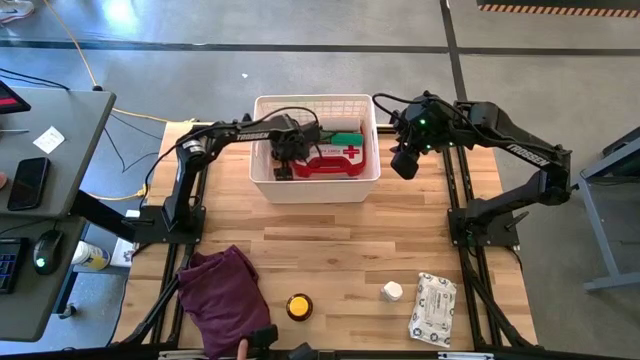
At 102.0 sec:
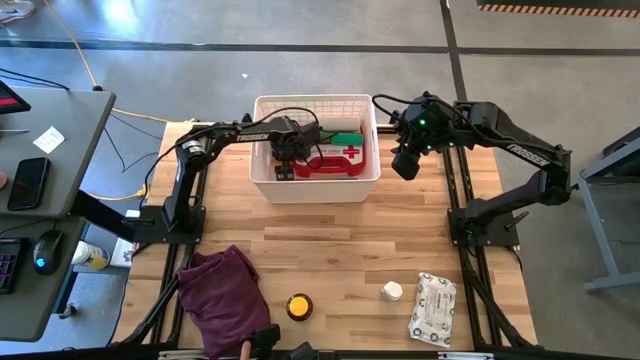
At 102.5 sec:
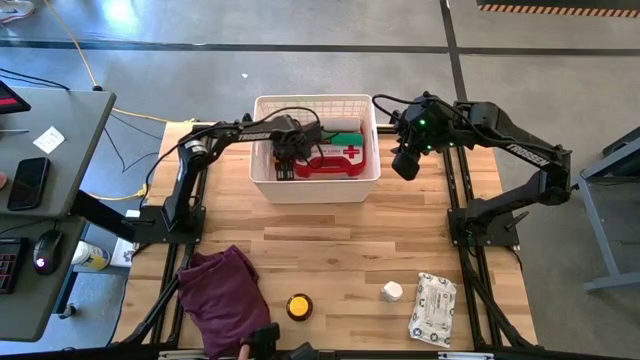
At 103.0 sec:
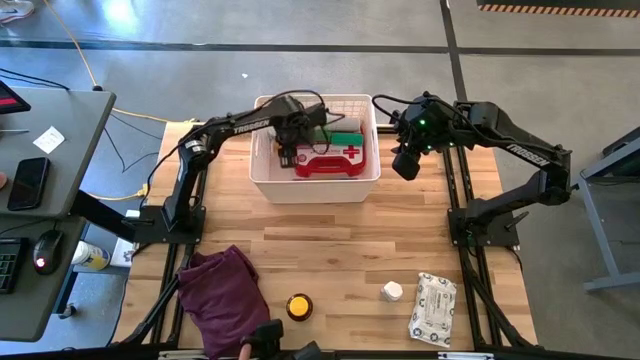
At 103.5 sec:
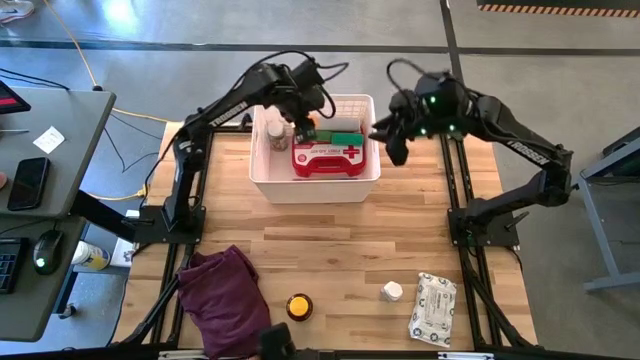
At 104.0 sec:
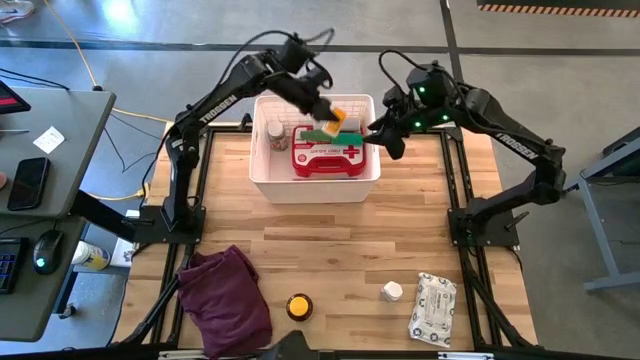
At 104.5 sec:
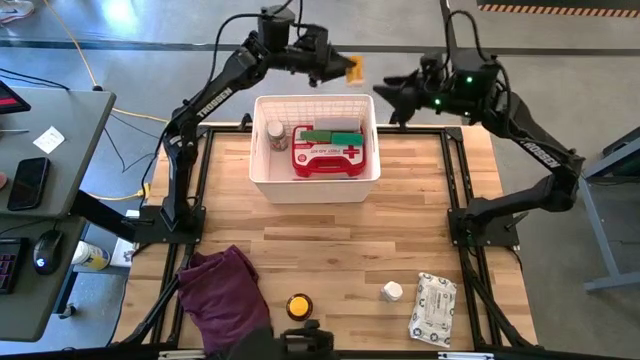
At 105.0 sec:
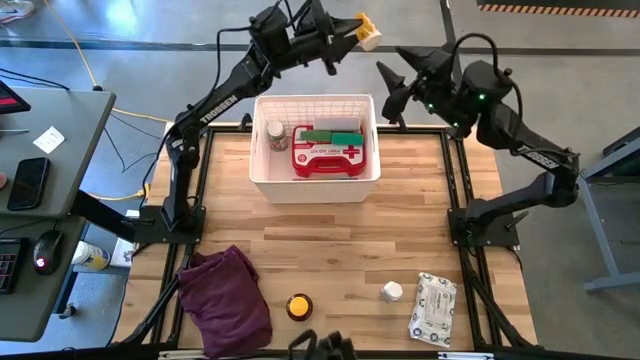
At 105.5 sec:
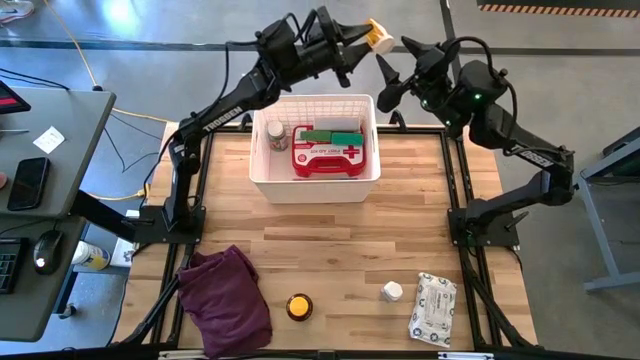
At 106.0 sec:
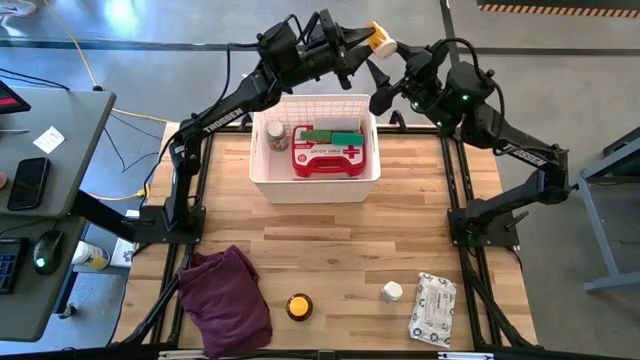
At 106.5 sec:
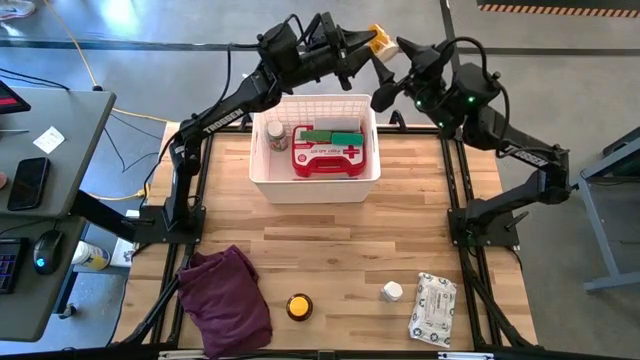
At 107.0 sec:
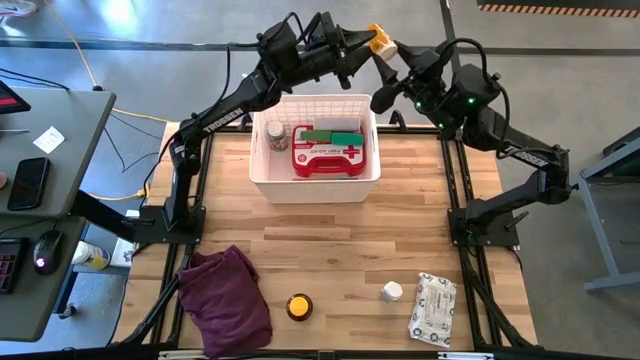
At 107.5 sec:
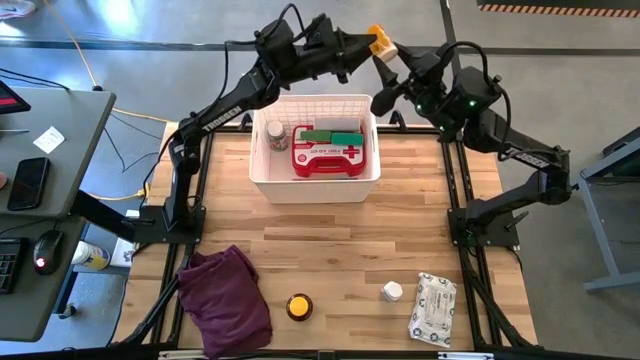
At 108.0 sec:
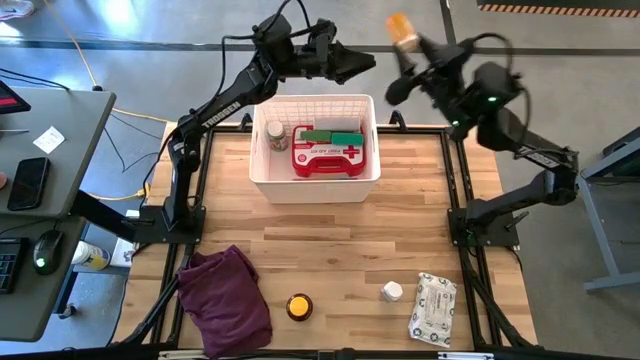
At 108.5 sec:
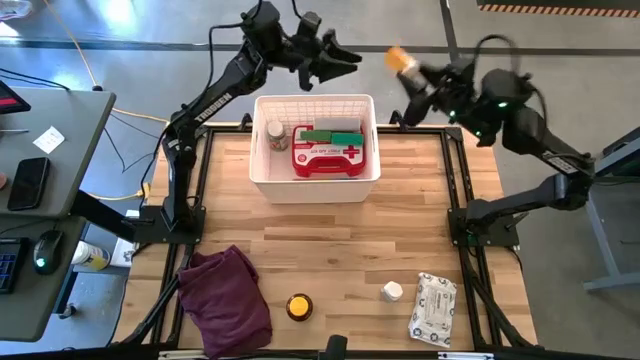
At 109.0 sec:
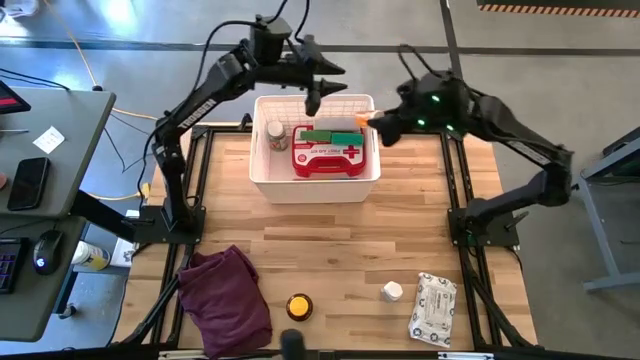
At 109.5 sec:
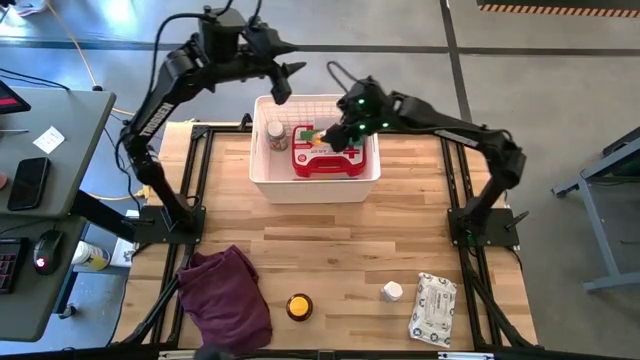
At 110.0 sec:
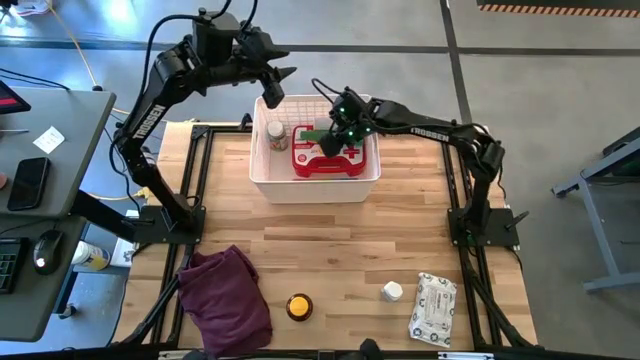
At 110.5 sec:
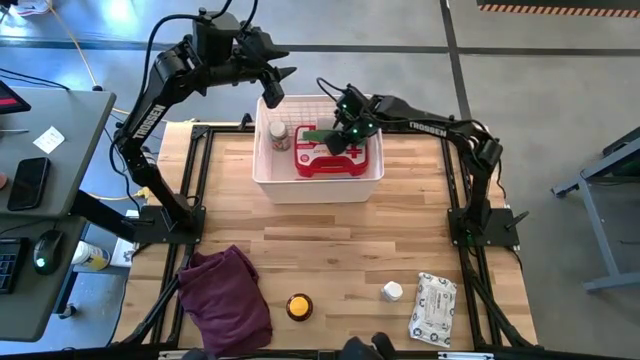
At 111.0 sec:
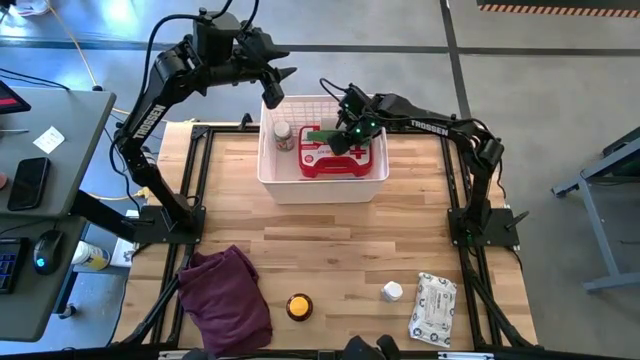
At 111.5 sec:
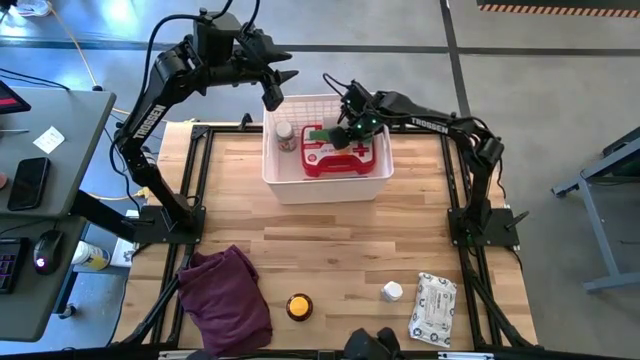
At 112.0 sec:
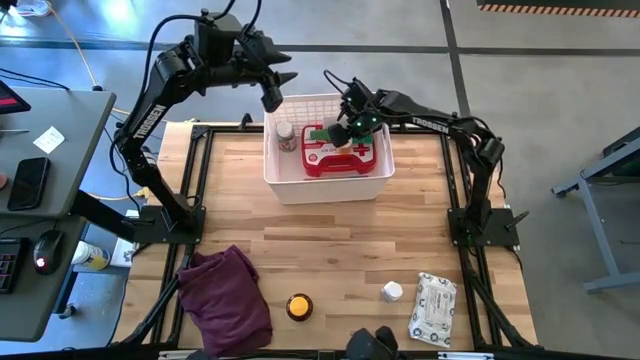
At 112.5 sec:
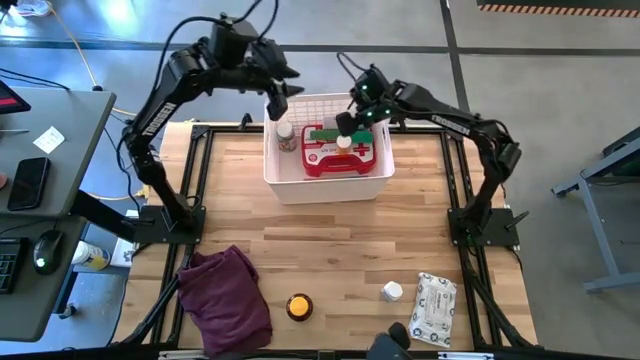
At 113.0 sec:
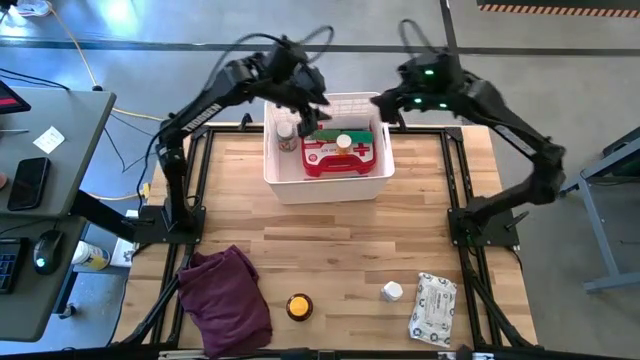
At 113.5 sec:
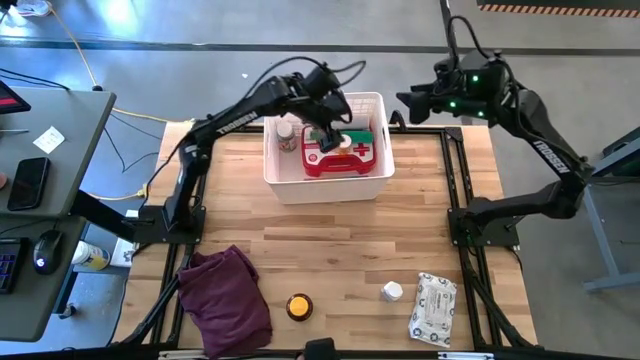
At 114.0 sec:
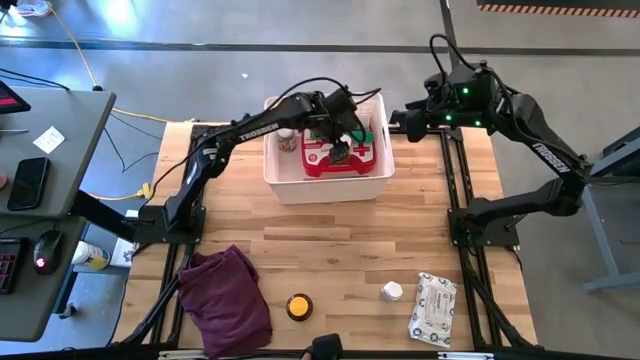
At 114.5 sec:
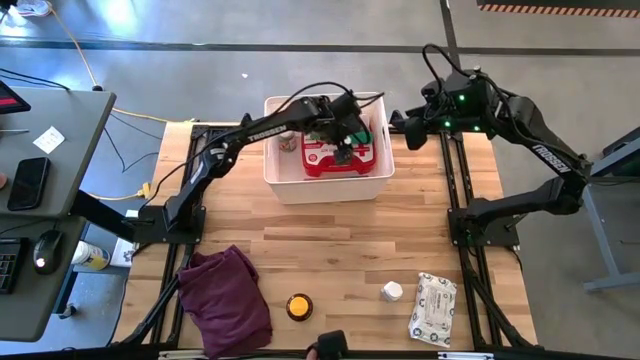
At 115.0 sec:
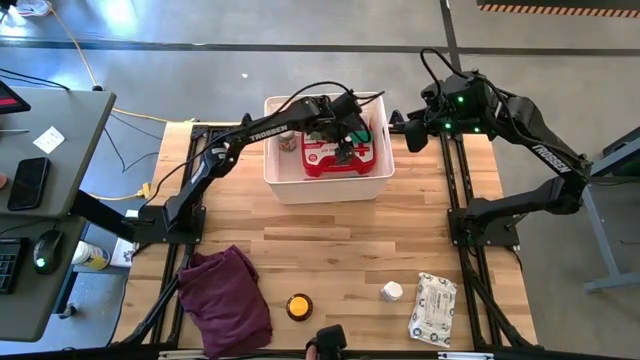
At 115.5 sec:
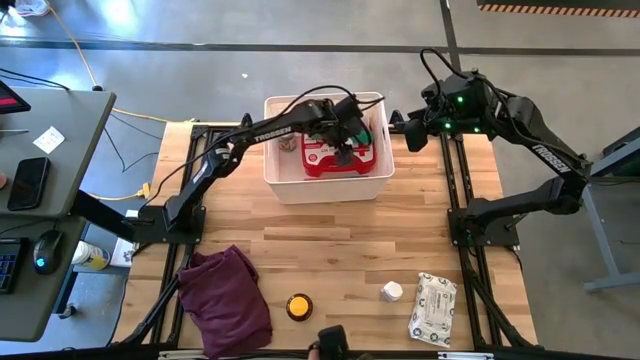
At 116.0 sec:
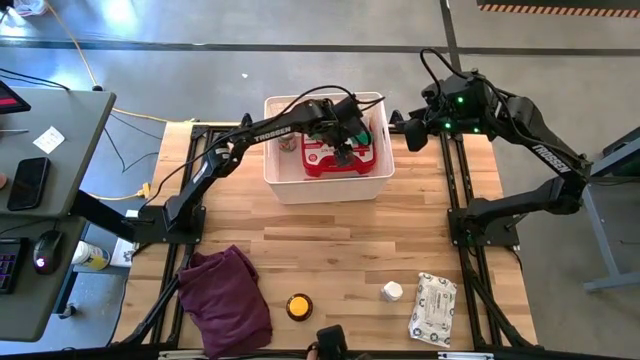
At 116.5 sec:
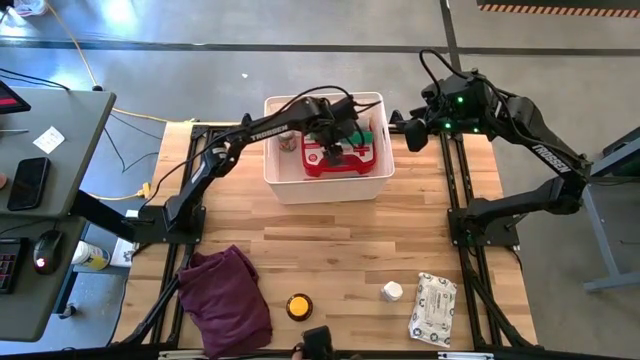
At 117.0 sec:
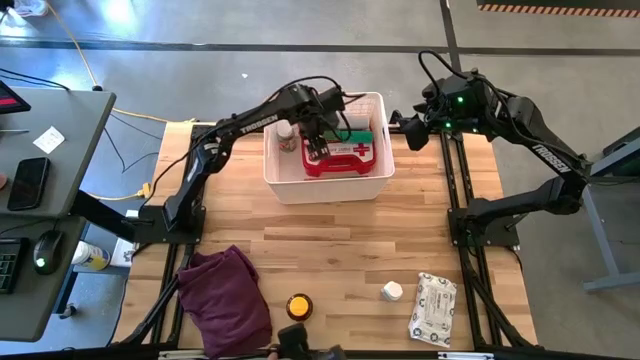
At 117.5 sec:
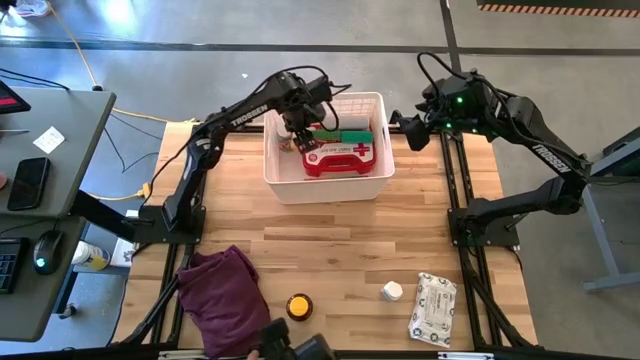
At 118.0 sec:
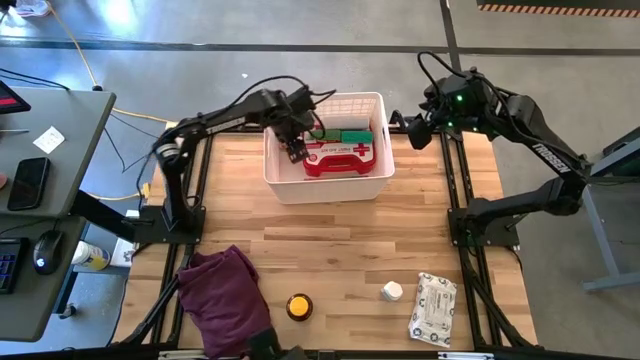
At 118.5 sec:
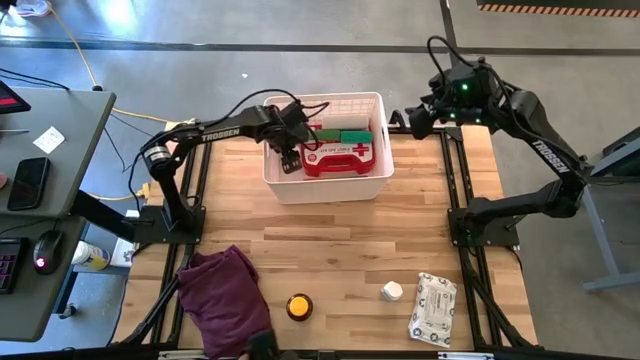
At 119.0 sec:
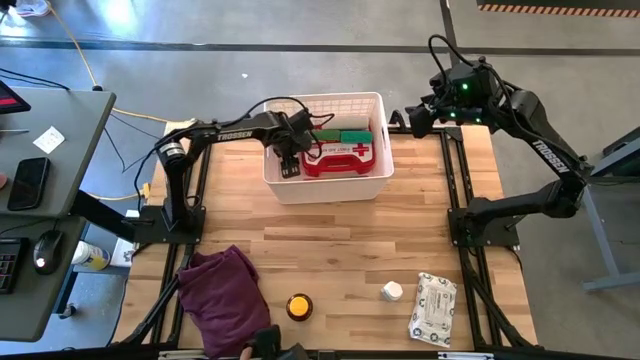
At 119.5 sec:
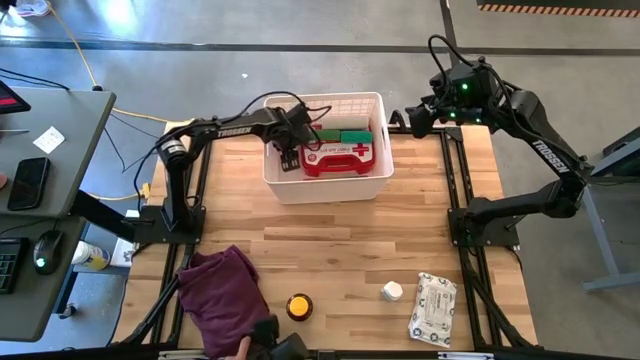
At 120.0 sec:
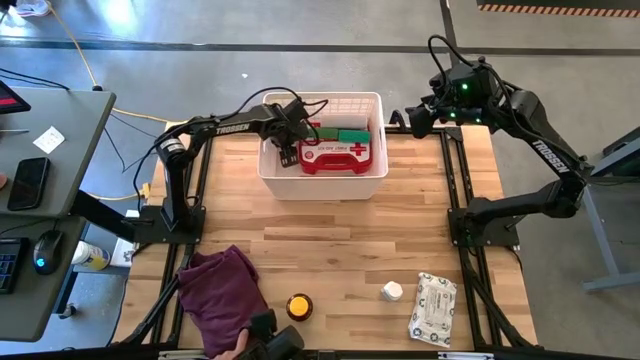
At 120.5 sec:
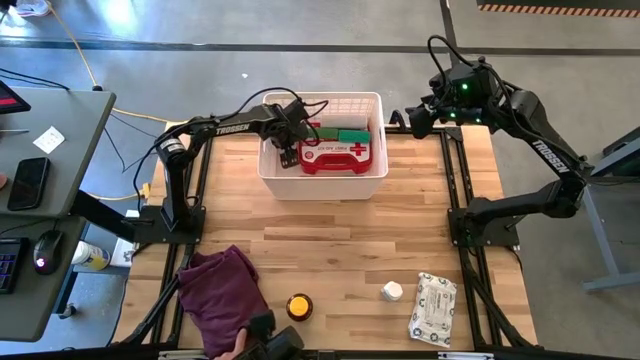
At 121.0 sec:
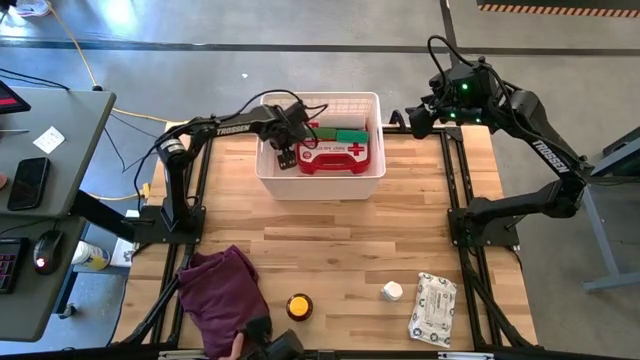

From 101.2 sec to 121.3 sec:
Task: Pick & place medical supplies in basket/bin
Put the orange pill bottle into the white bin

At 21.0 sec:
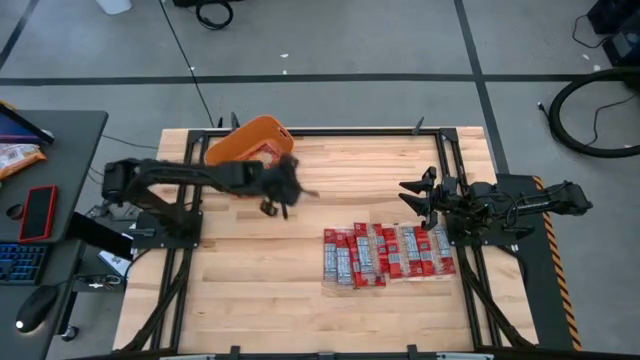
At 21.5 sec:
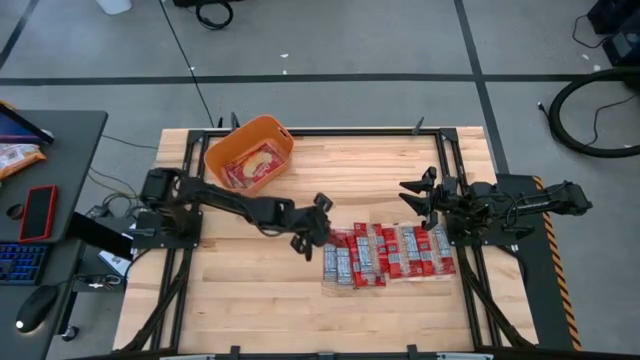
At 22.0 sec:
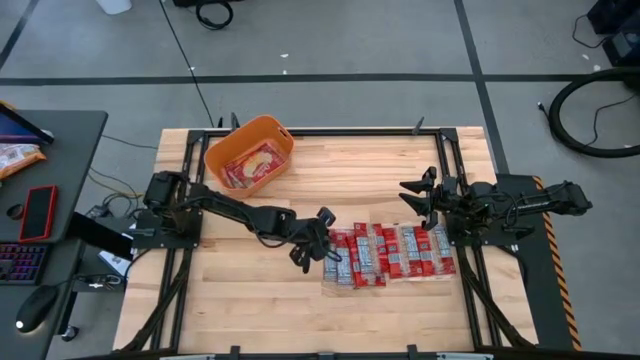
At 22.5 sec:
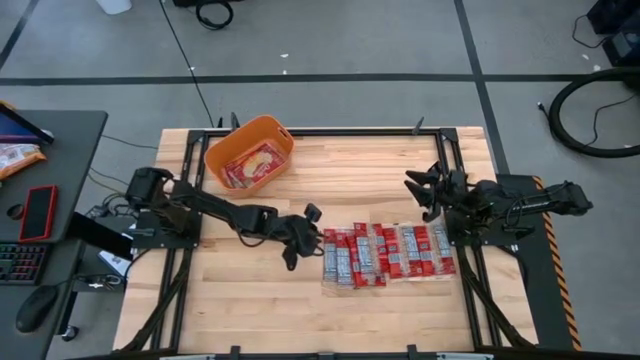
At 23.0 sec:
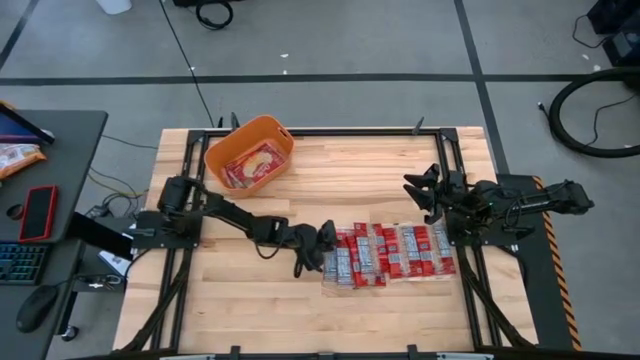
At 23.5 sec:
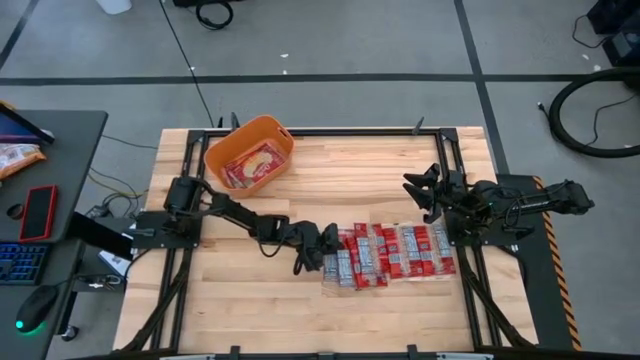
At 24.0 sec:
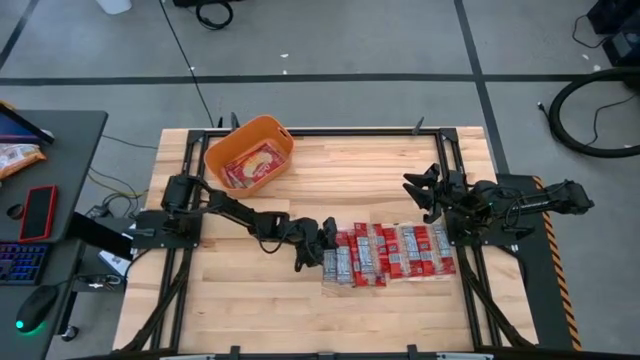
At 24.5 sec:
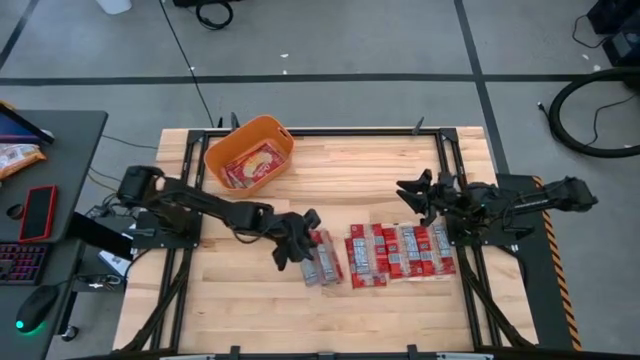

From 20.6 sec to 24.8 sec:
Task: Sort popcorn bags into baskets
Put the red popcorn bag into the orange container
